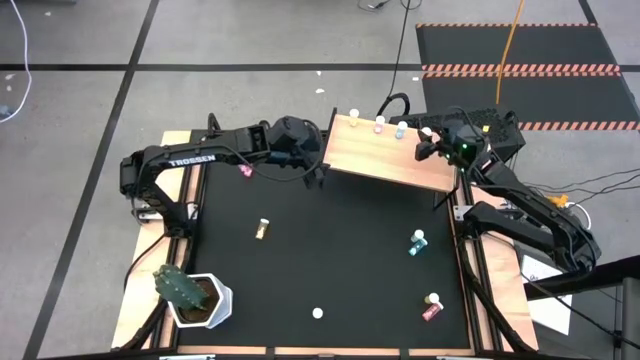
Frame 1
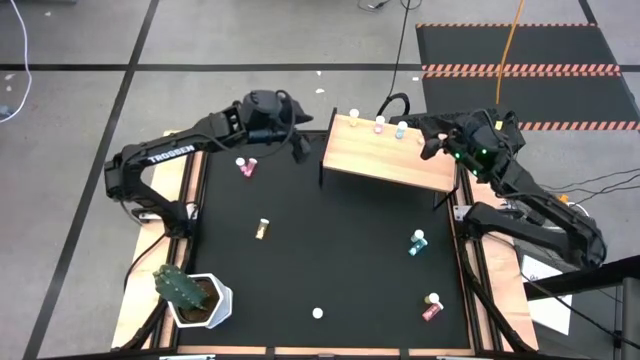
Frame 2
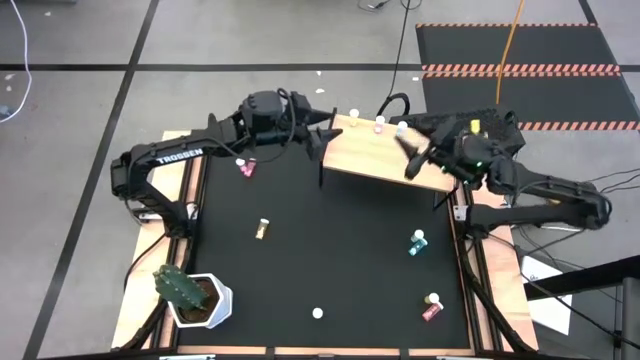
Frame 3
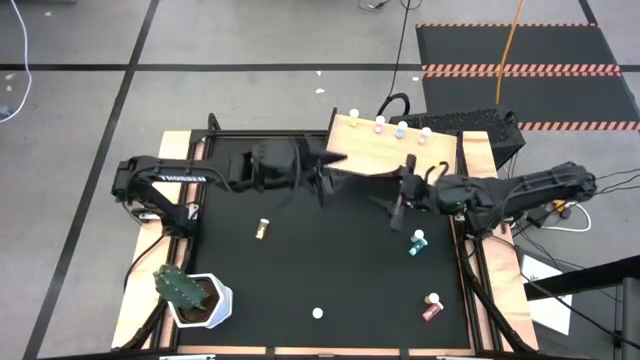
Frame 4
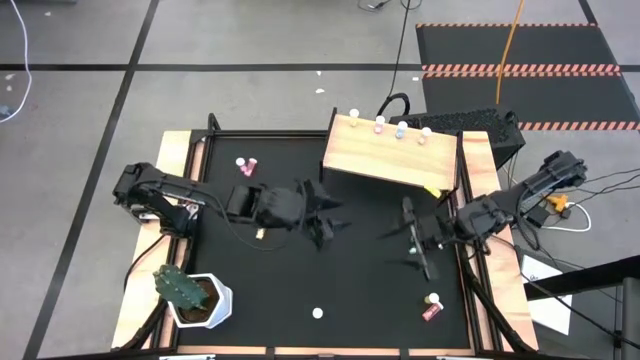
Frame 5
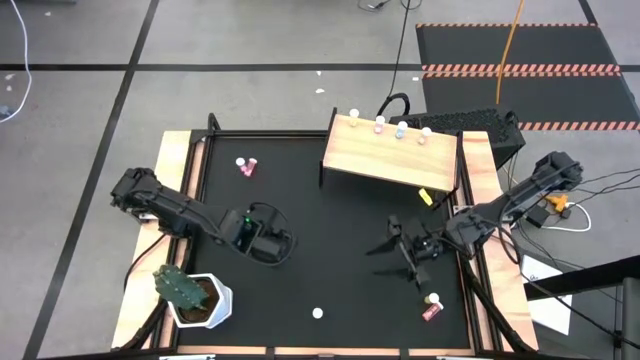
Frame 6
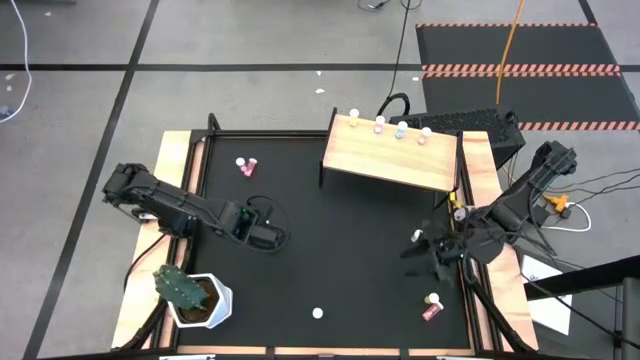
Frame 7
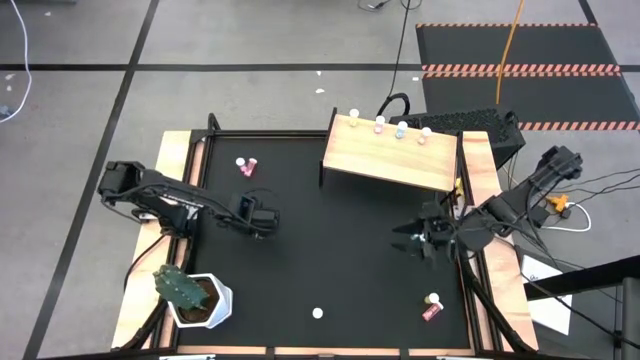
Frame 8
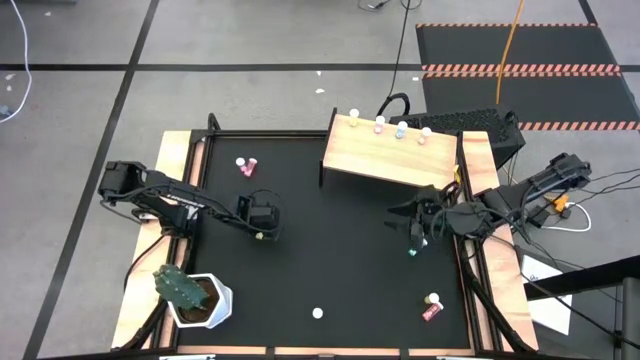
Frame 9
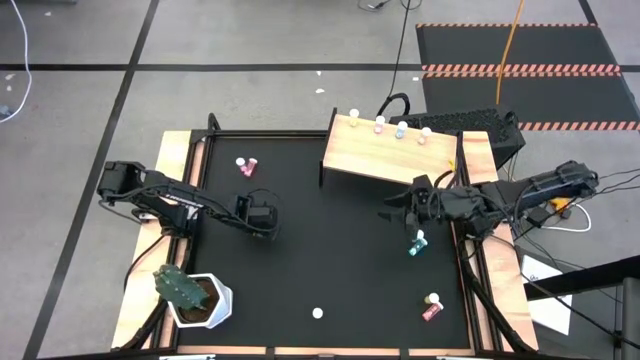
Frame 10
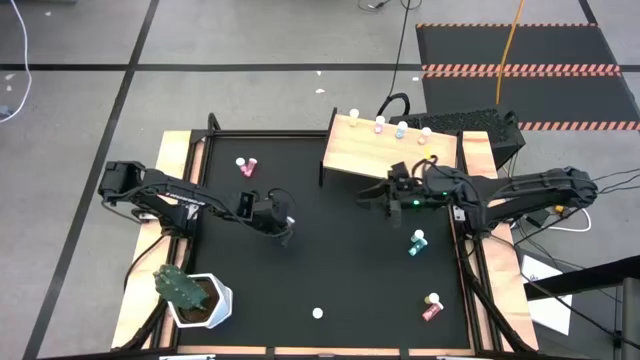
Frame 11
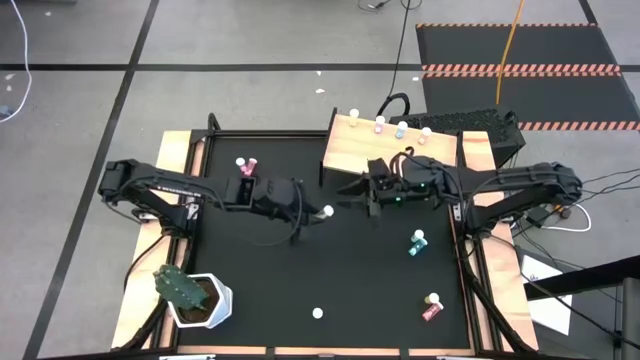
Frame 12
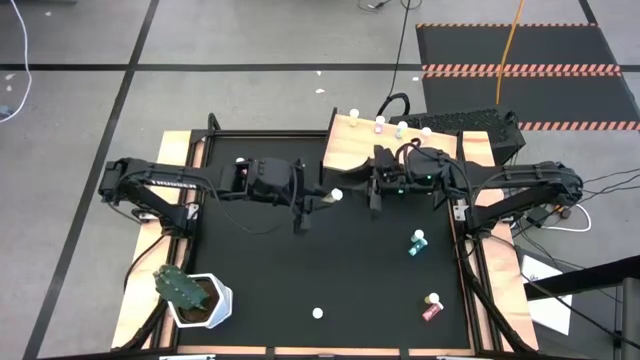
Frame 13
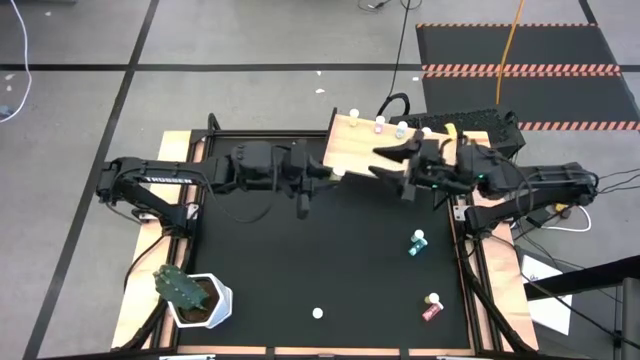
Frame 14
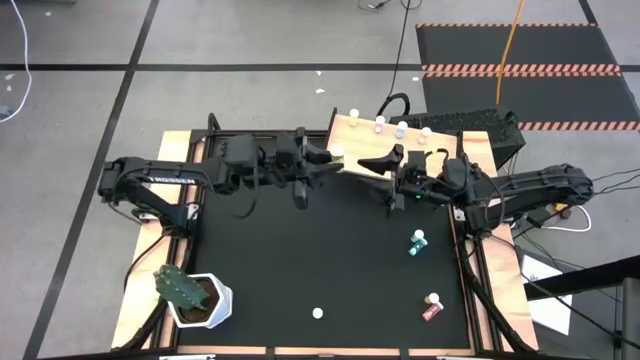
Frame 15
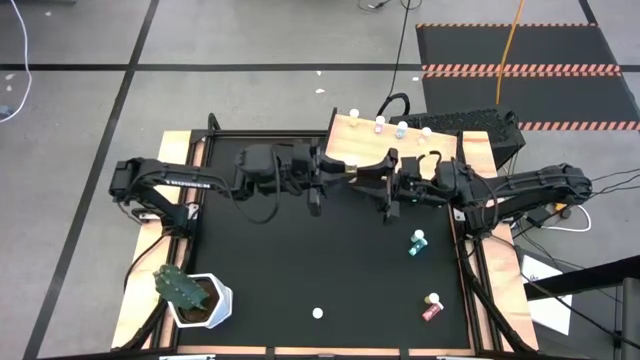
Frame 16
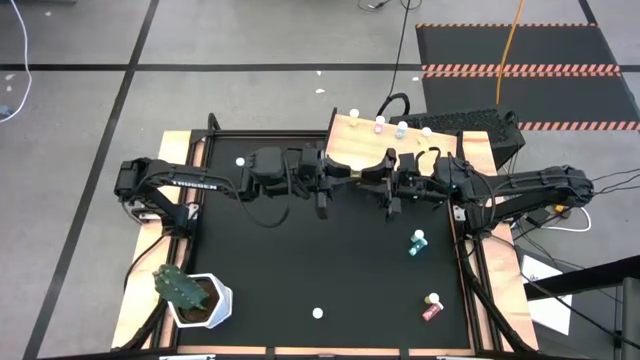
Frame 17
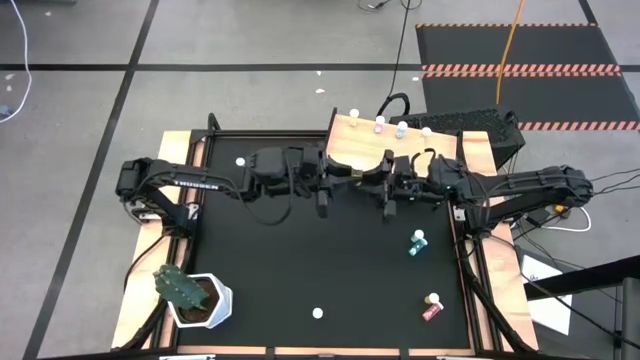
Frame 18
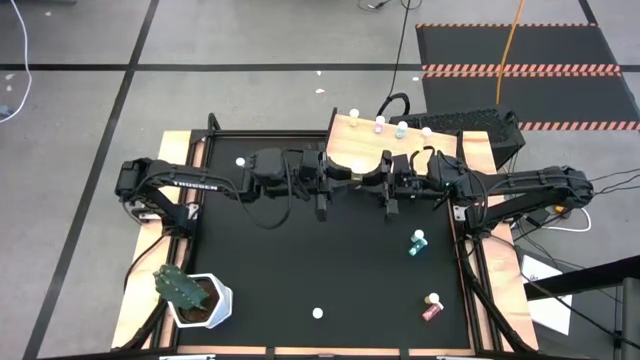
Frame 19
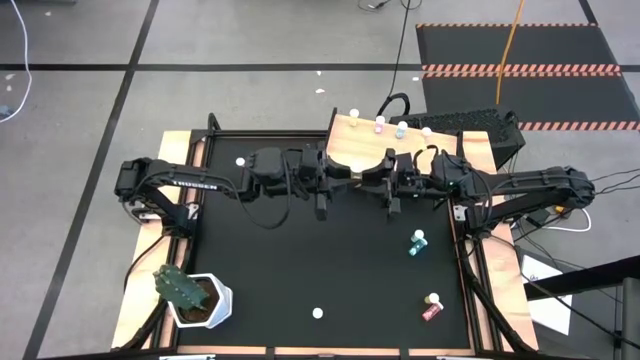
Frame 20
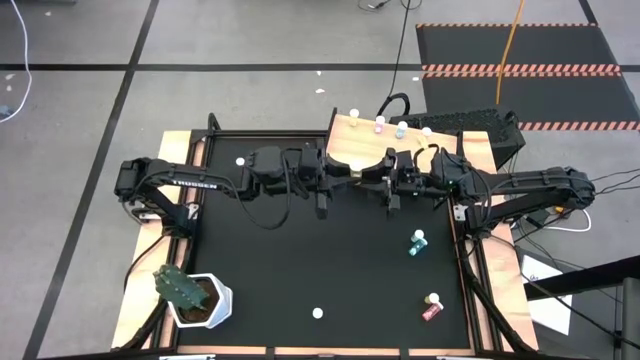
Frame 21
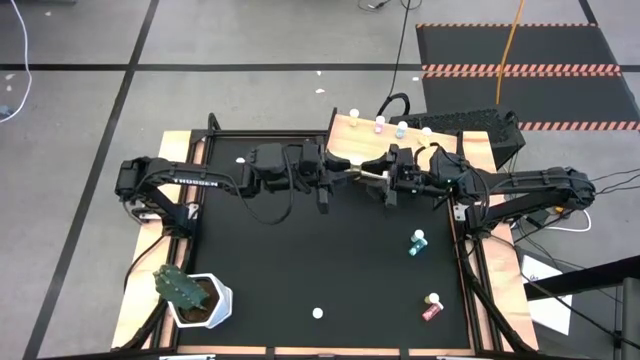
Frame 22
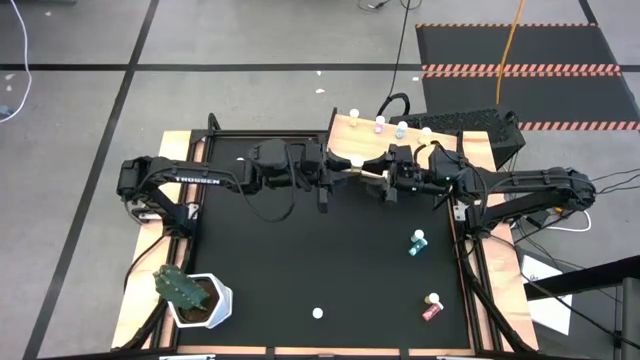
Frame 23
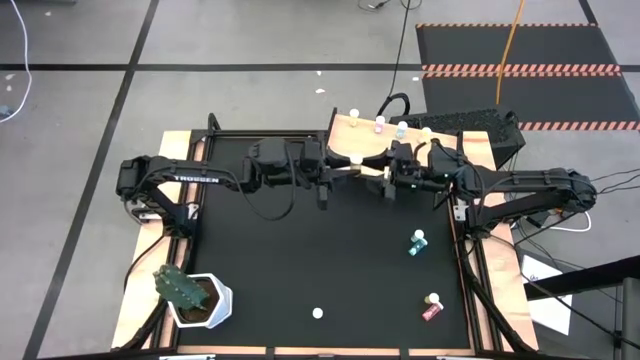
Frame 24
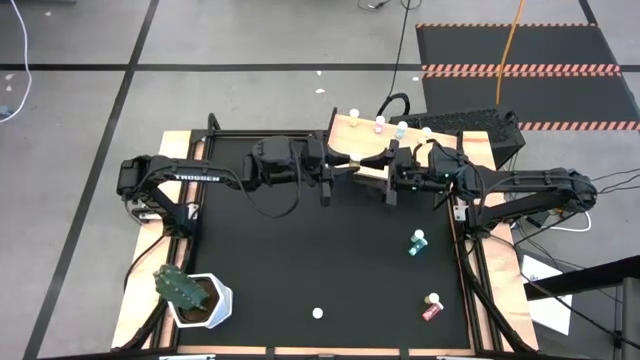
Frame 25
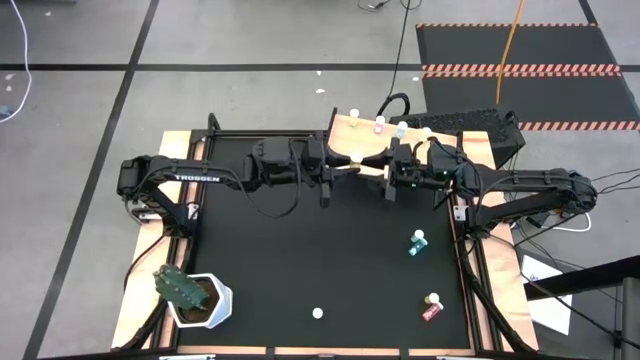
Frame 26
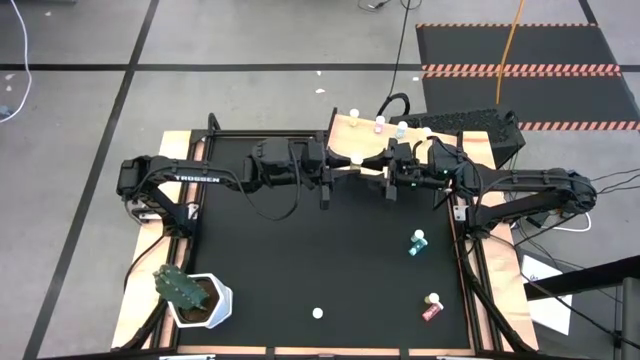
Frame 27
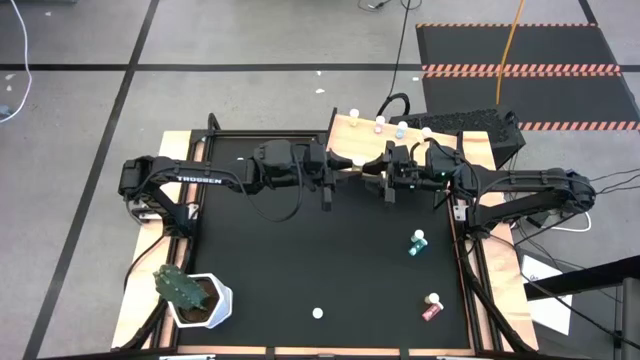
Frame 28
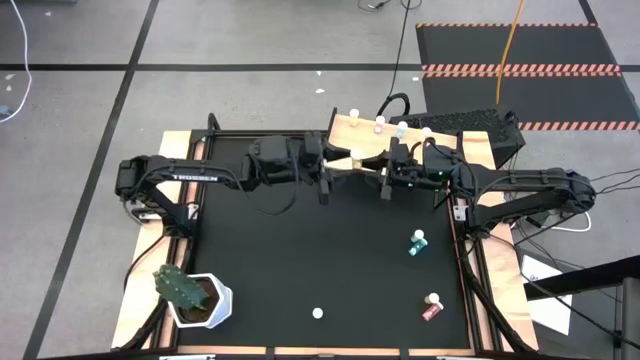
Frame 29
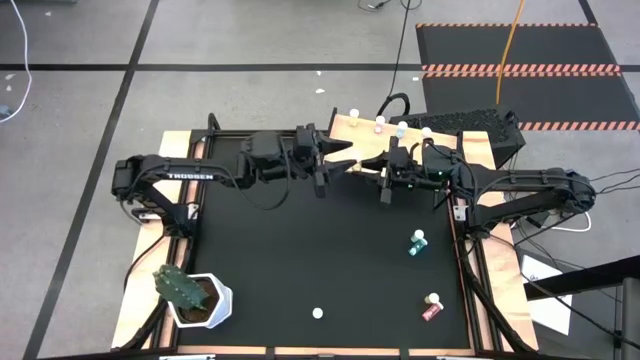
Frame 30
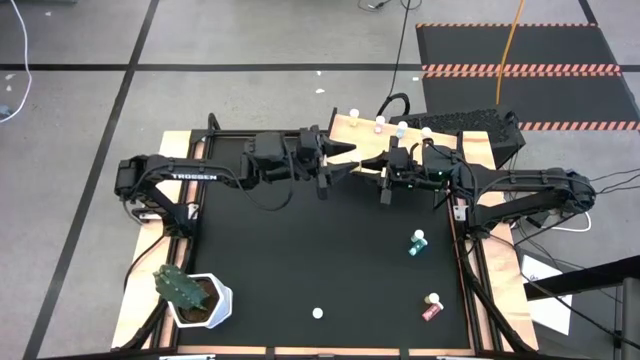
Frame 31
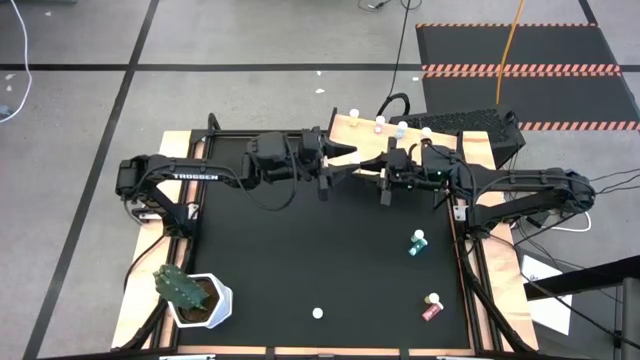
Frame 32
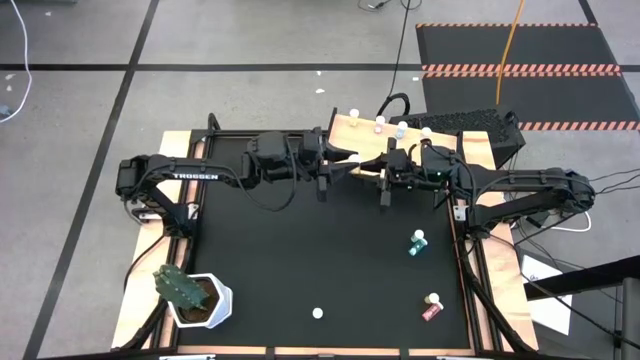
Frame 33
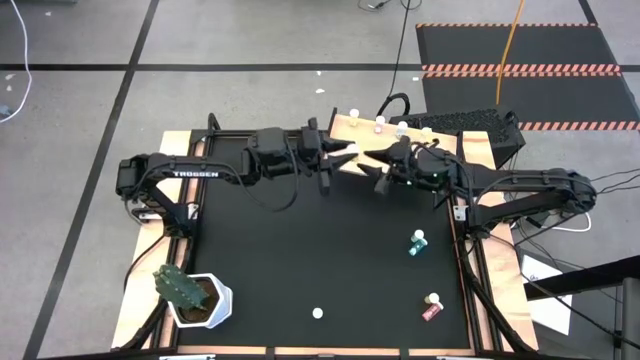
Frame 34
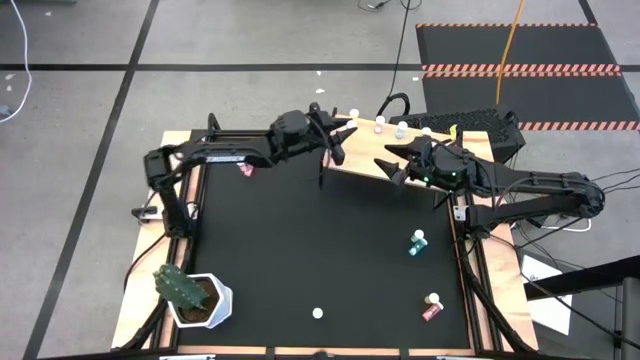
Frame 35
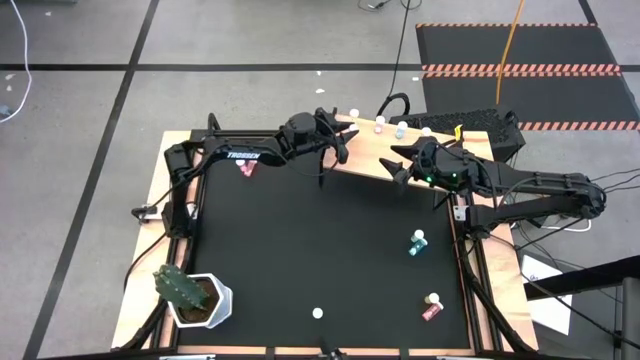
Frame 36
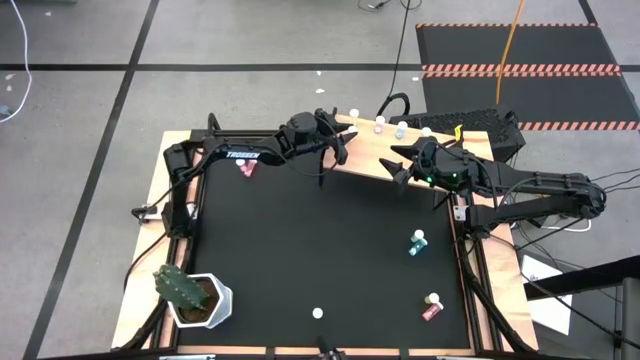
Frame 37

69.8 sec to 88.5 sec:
Task: Pick and place medicine bottles onto shelf by color
Put the left yellow pill bottle on the shelf aligned with the other yellow pill bottle

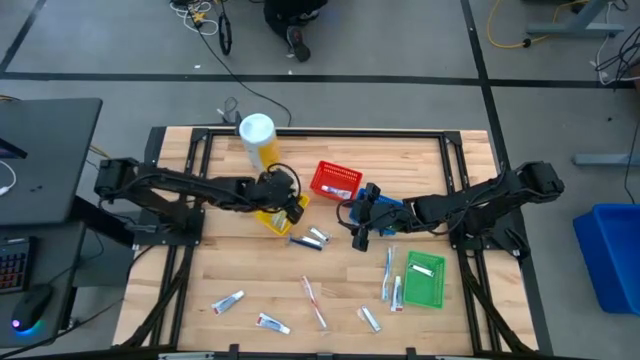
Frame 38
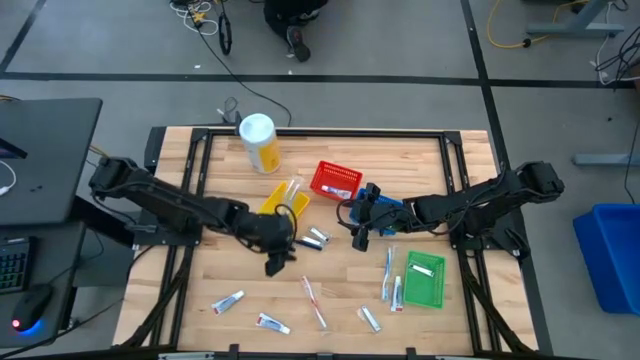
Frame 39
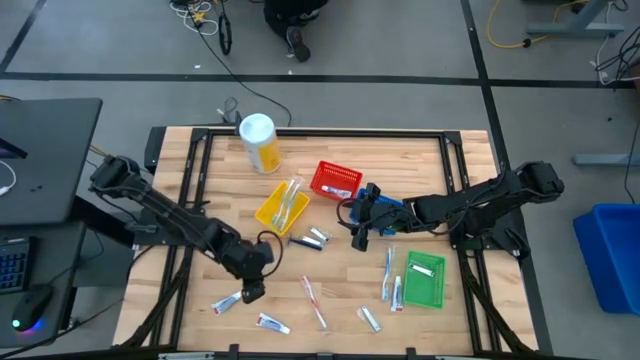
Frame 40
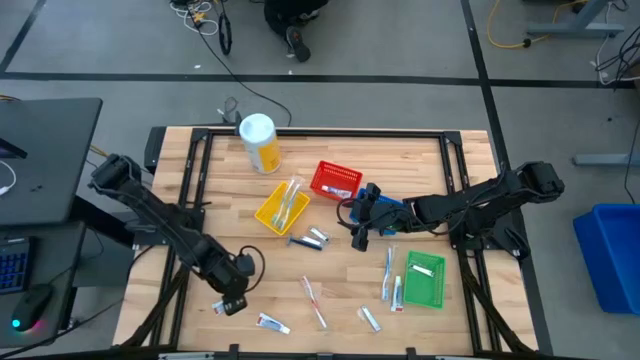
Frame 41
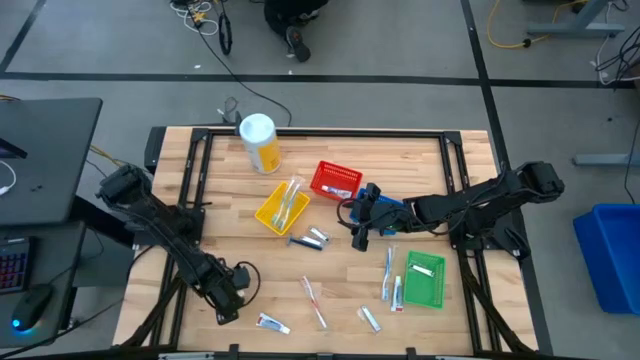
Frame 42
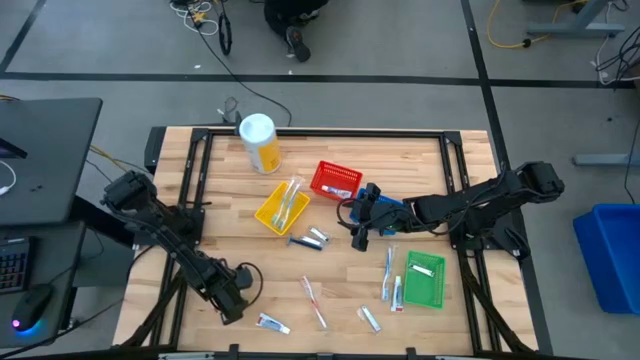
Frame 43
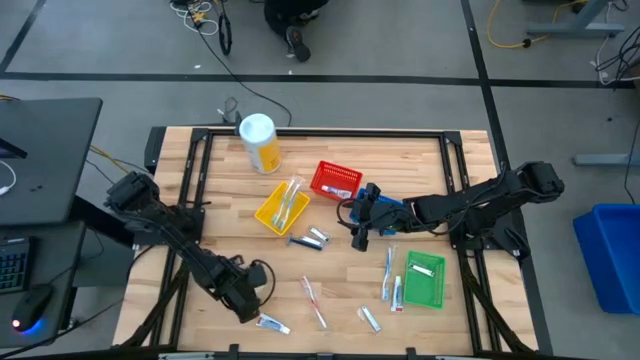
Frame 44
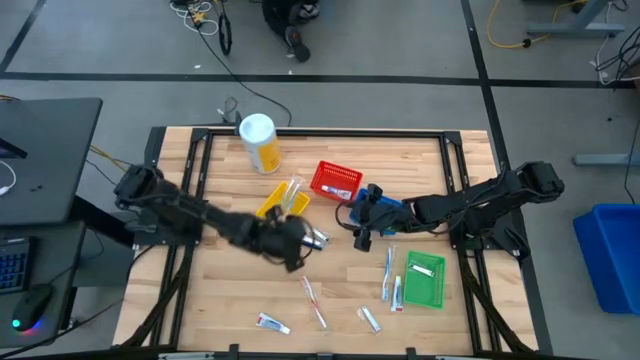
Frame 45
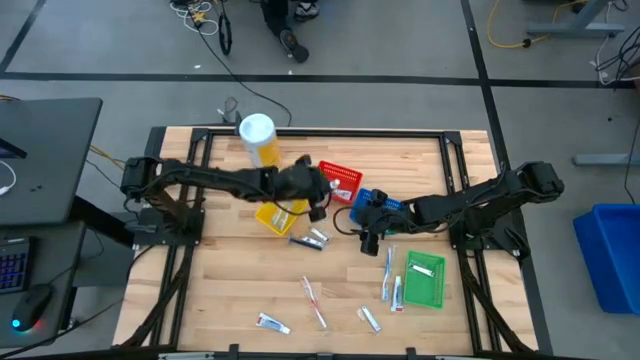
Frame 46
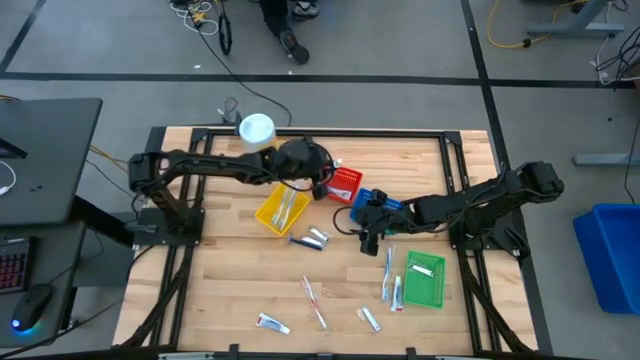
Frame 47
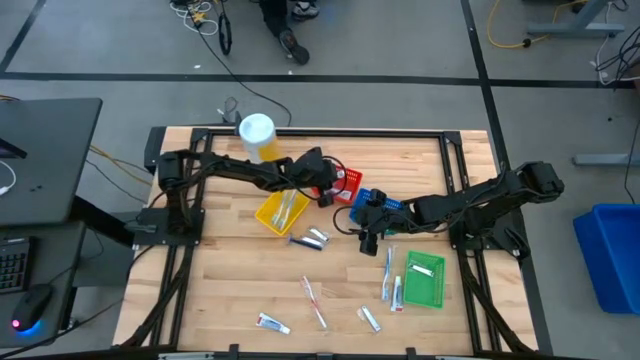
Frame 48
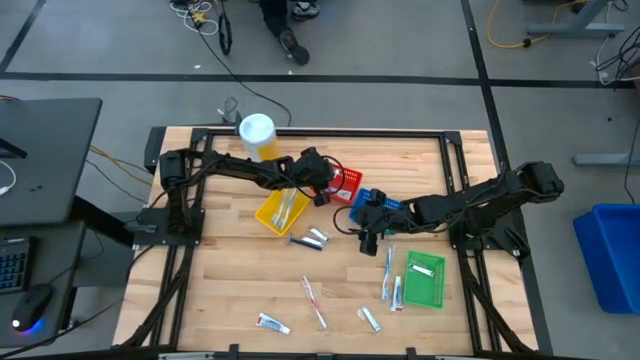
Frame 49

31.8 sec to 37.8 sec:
Task: Pick & Place Travel size toiletries
Put the white toothpaste into the red bin
